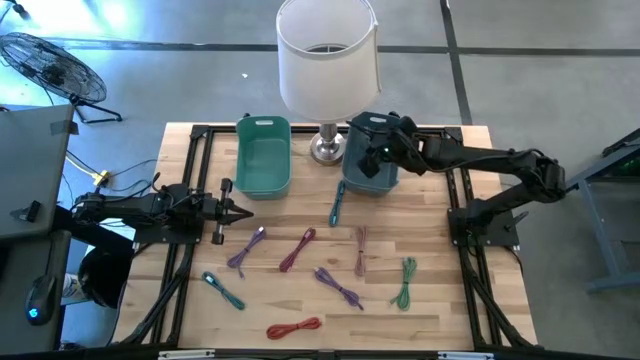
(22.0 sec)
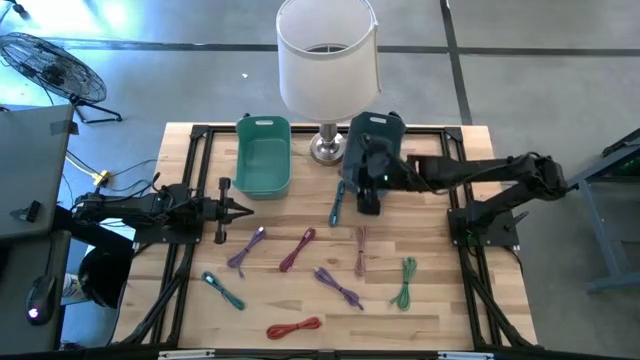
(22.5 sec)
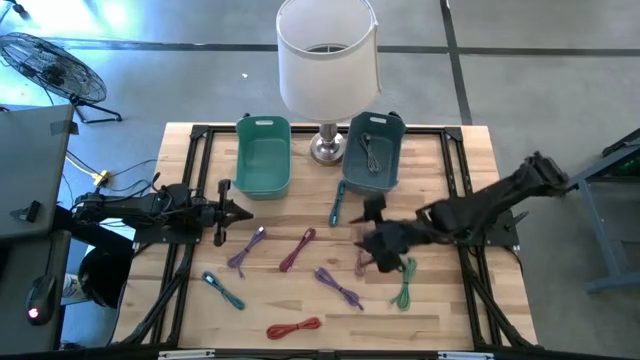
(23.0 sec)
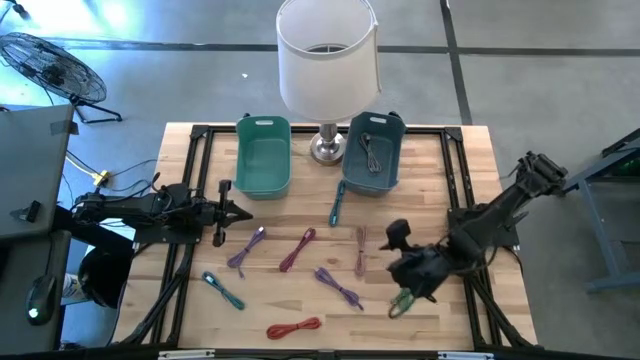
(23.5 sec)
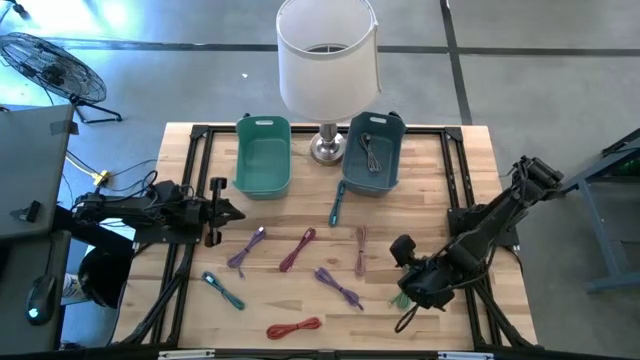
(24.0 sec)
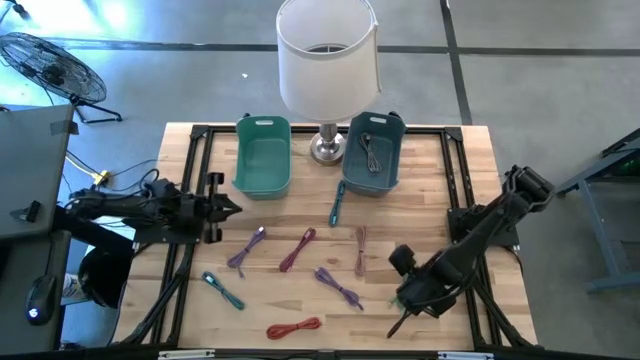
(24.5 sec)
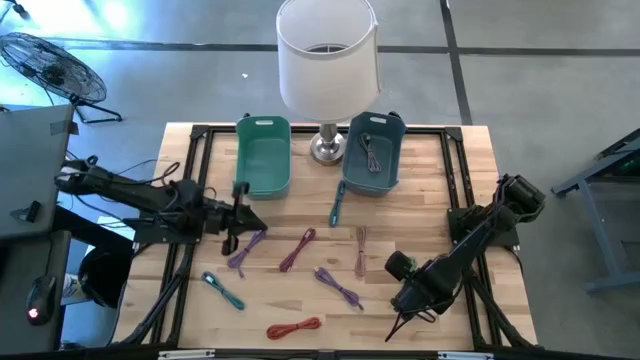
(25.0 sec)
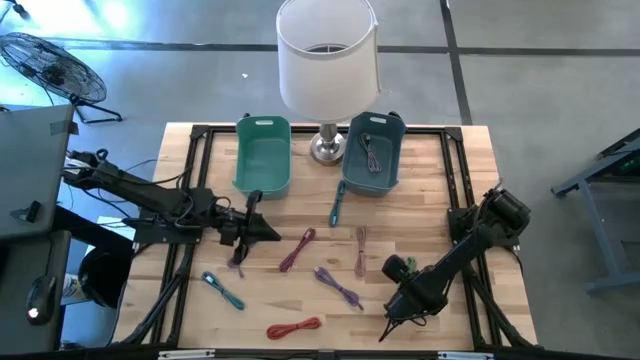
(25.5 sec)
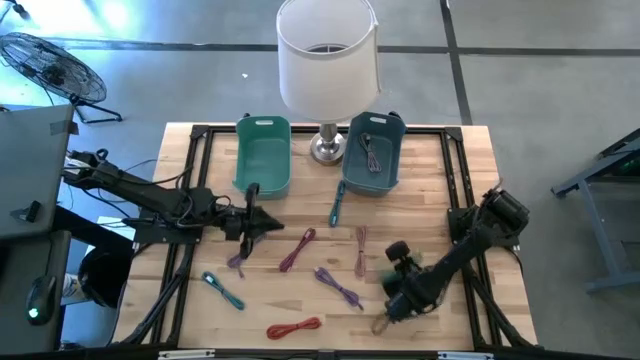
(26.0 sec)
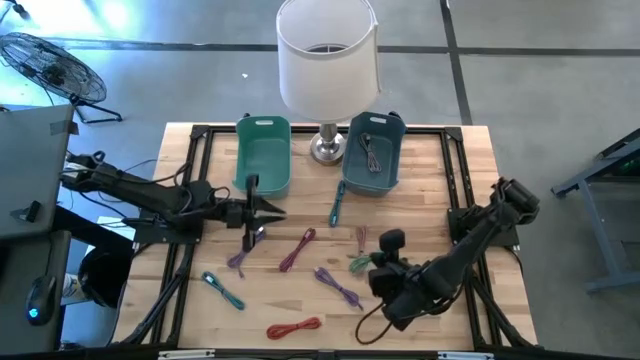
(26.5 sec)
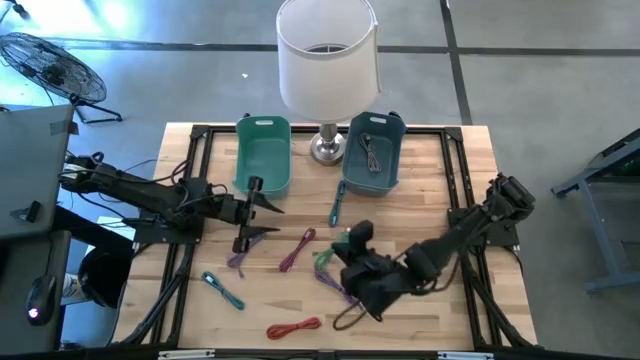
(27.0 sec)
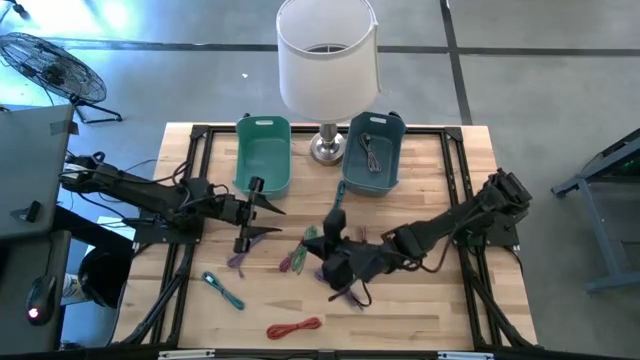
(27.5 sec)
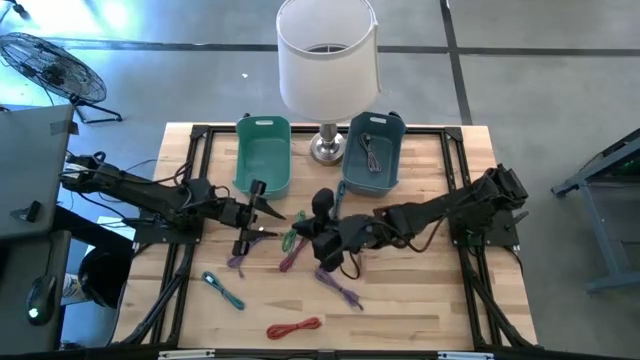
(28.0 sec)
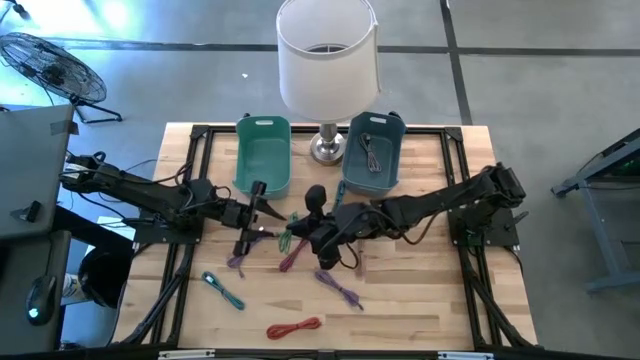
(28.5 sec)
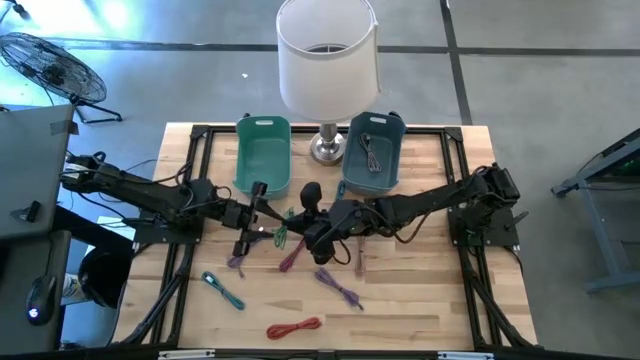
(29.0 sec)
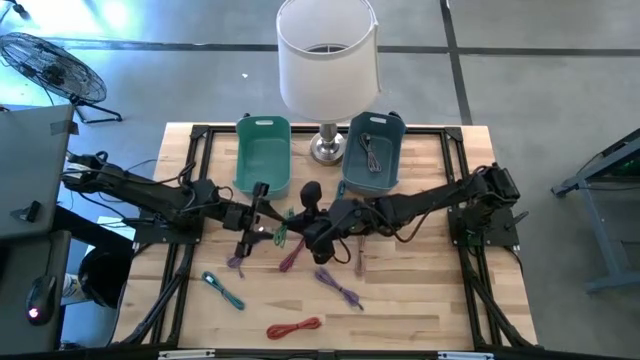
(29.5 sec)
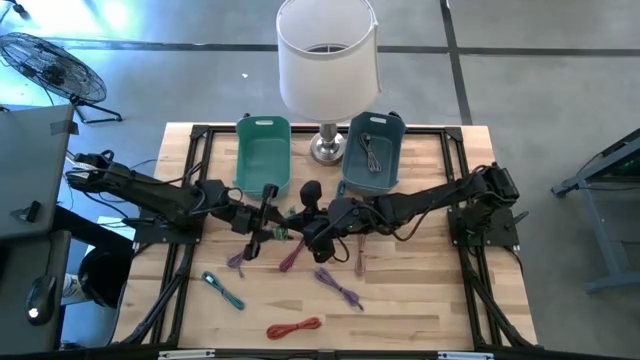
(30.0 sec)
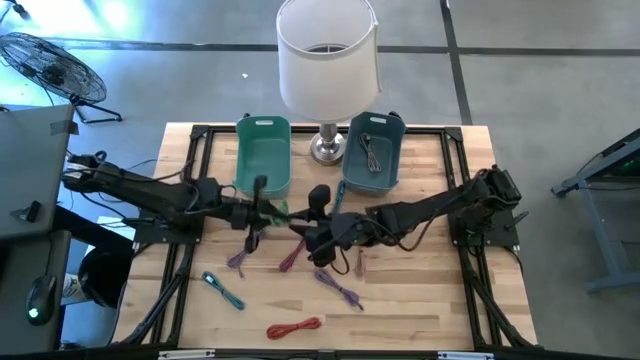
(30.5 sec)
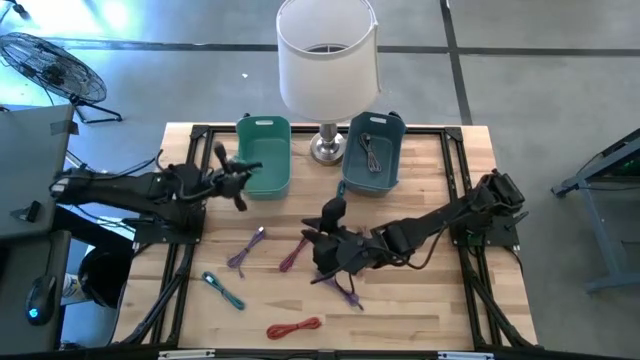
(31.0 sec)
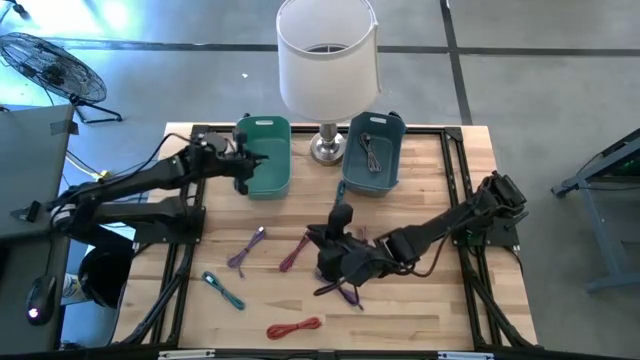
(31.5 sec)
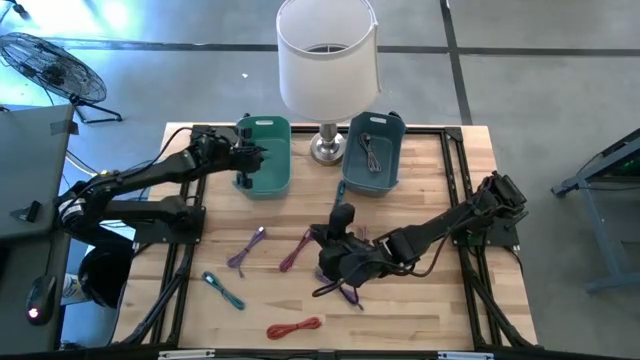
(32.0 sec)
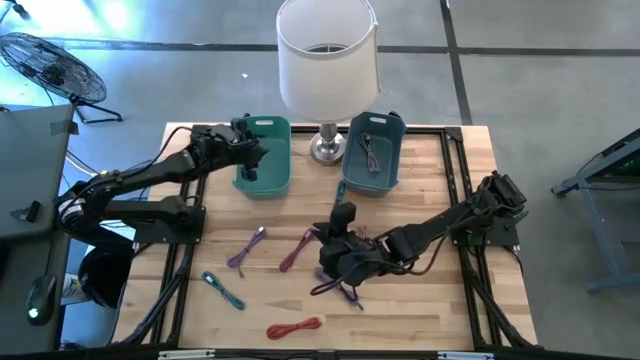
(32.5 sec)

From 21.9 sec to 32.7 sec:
Task: Pick & Place USB Port
Put the green charger cable into the green bin

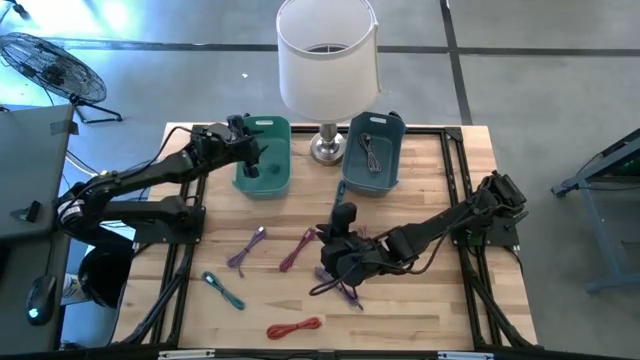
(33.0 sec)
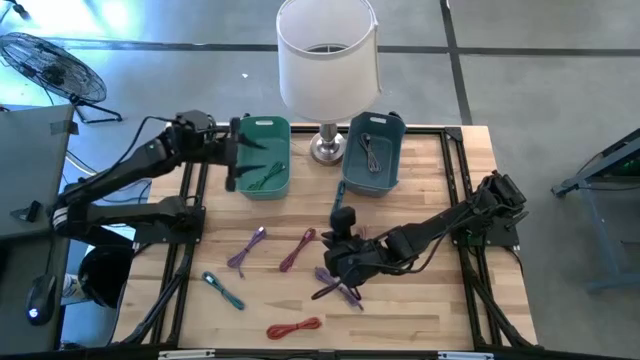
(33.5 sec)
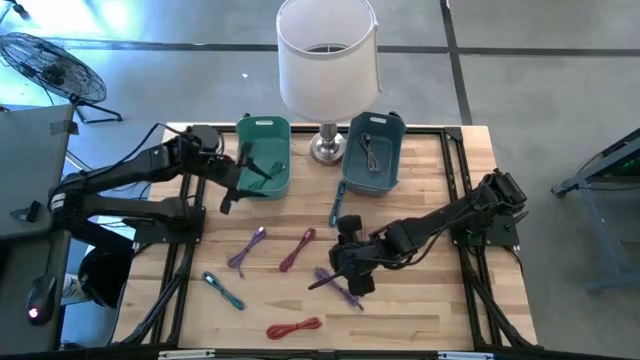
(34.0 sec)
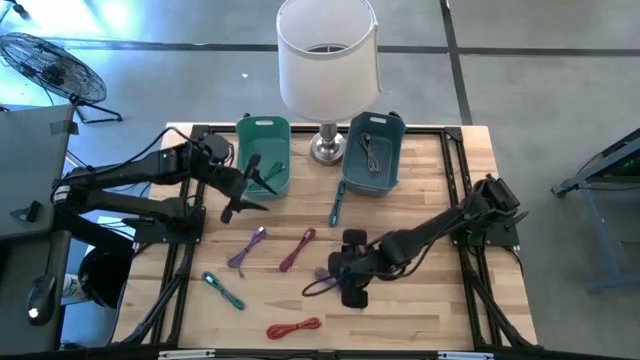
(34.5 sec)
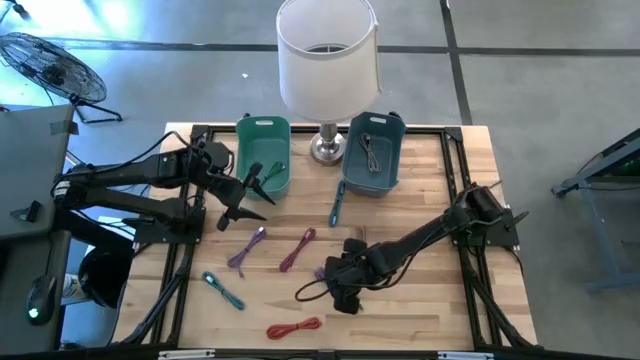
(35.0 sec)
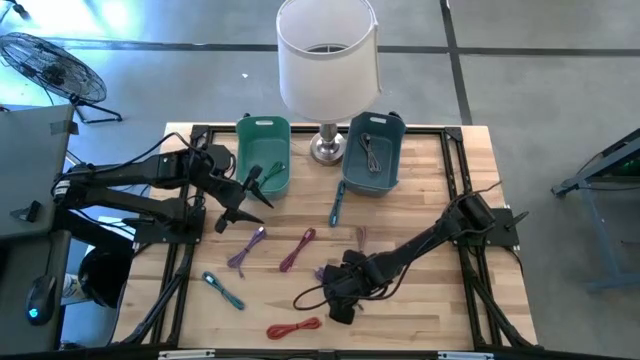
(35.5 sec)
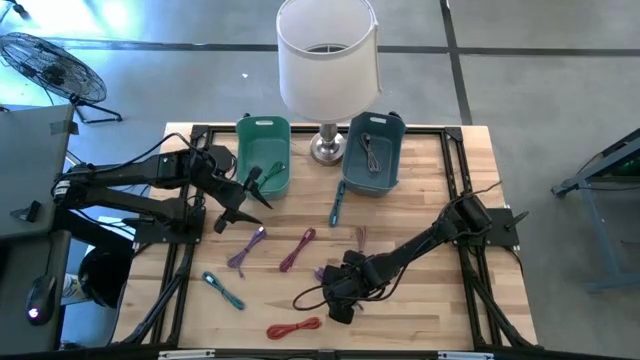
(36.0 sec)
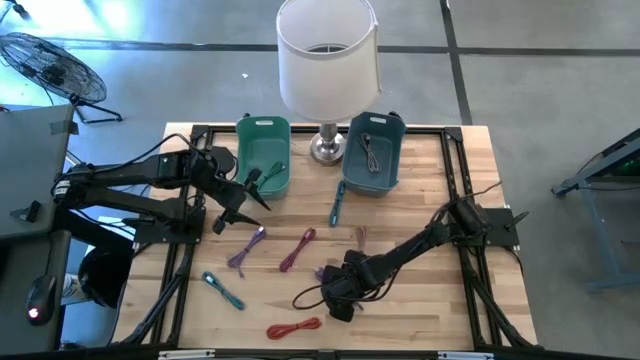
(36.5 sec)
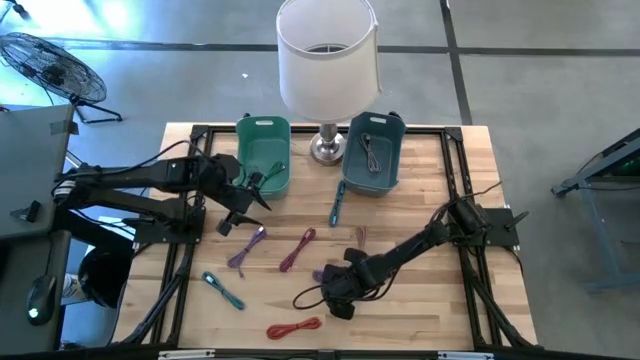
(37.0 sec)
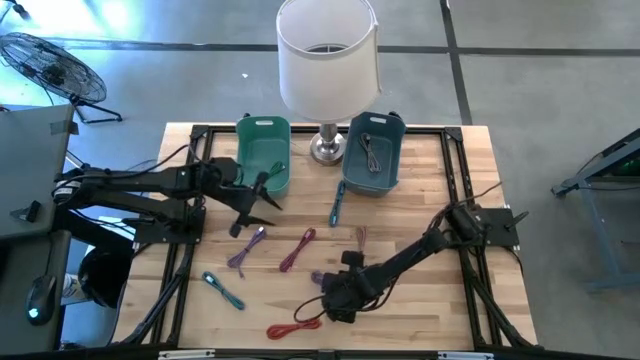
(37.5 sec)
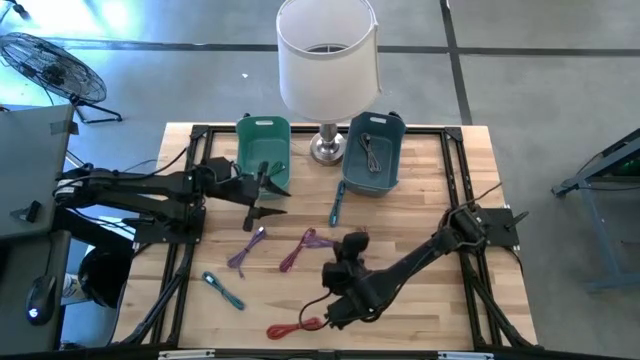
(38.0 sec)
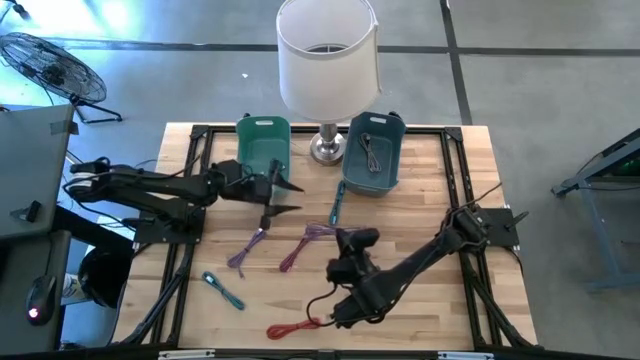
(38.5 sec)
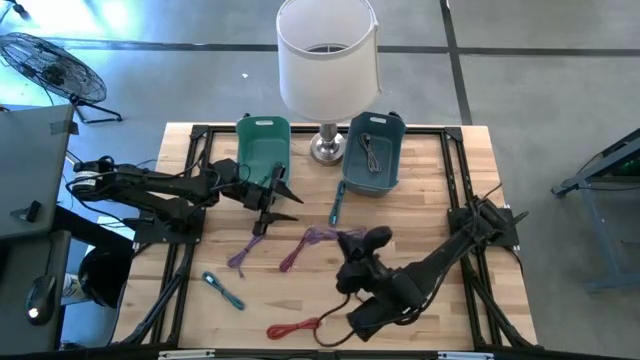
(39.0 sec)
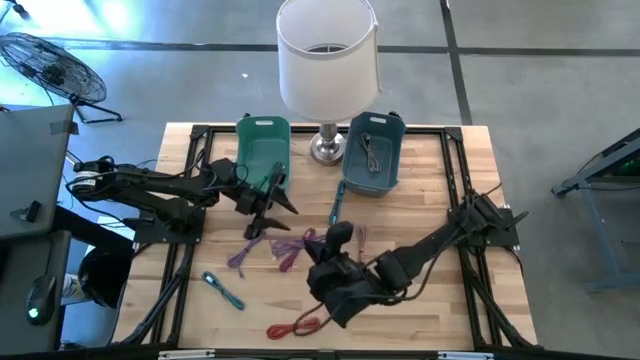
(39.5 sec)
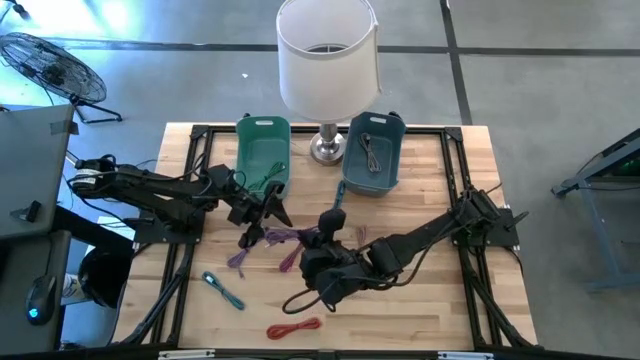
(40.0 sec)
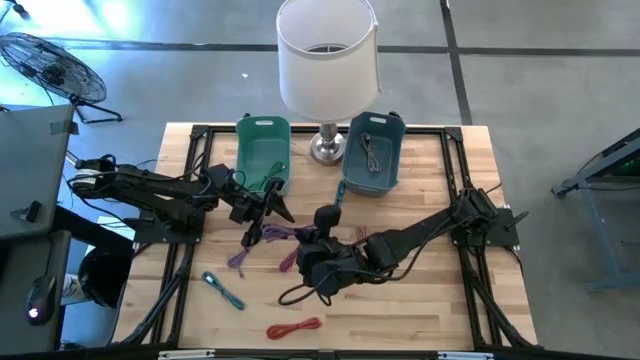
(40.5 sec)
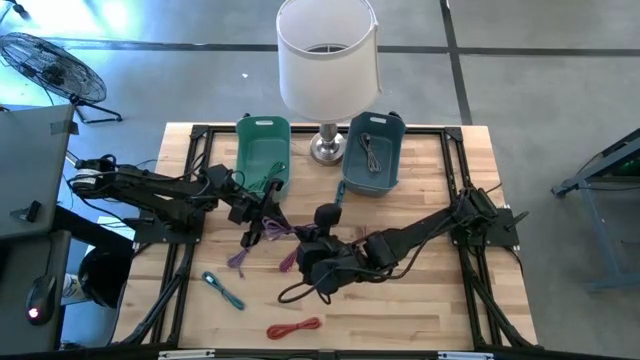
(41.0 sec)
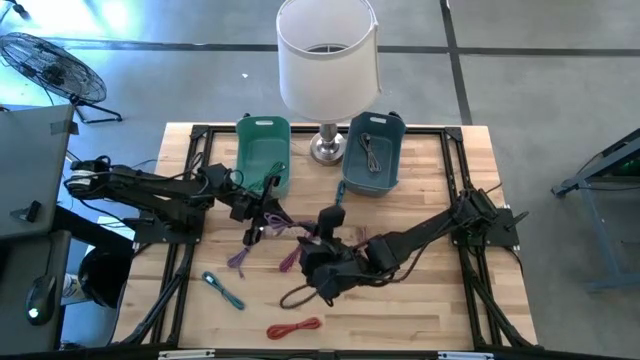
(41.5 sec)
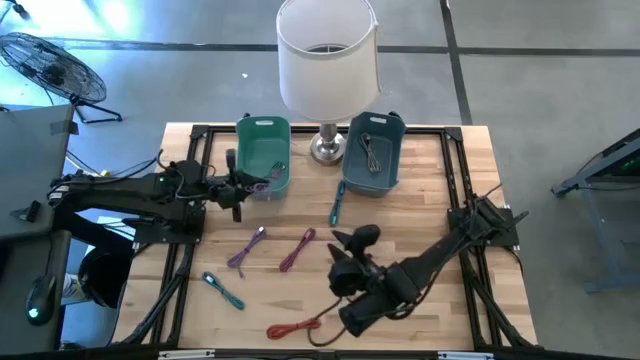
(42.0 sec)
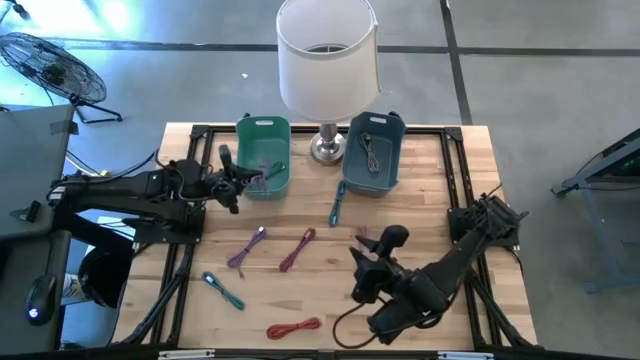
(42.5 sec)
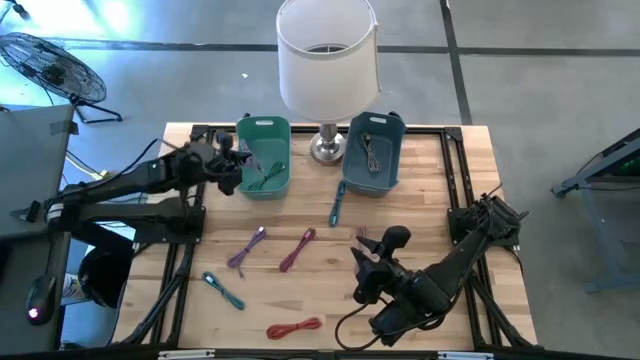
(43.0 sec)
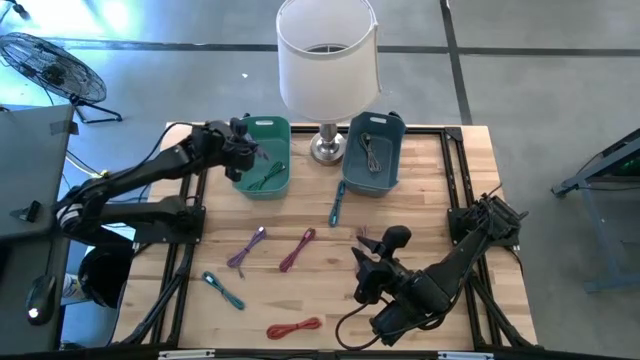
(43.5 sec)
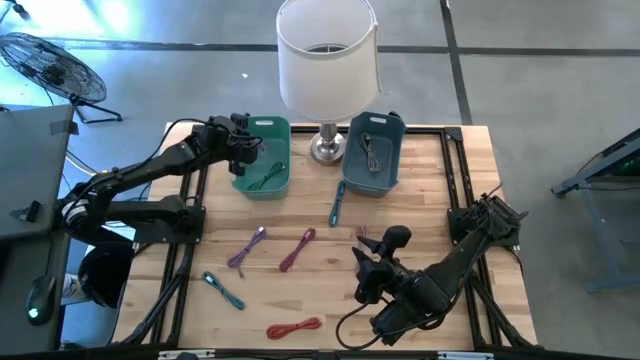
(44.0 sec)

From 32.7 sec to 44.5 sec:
Put the right purple charger cable into the green bin
